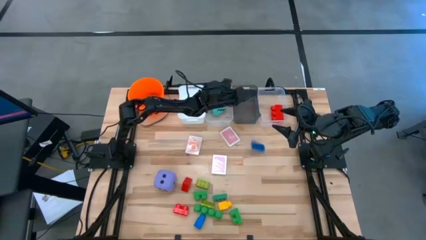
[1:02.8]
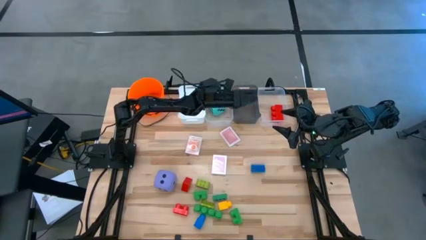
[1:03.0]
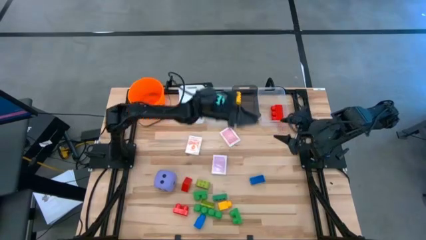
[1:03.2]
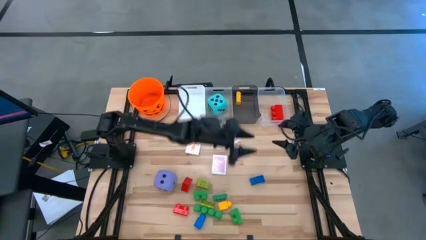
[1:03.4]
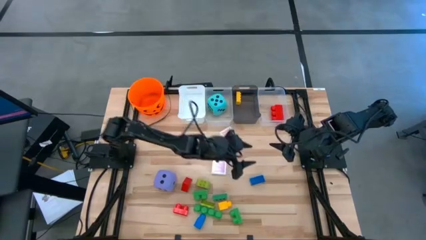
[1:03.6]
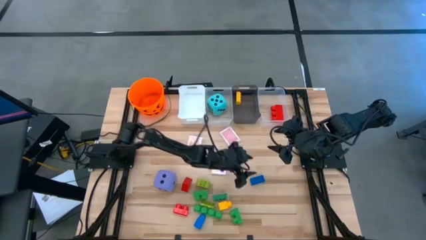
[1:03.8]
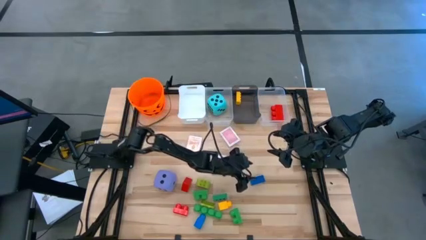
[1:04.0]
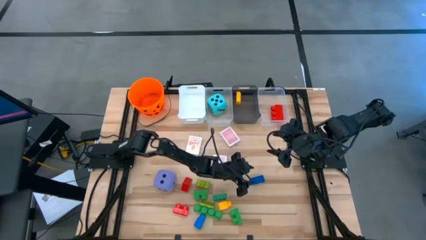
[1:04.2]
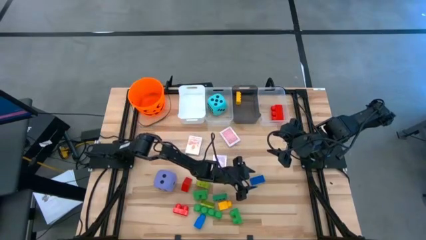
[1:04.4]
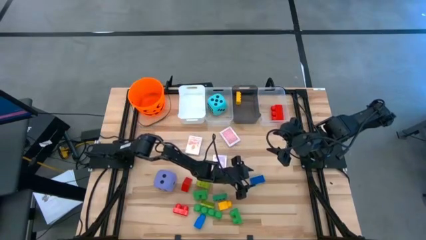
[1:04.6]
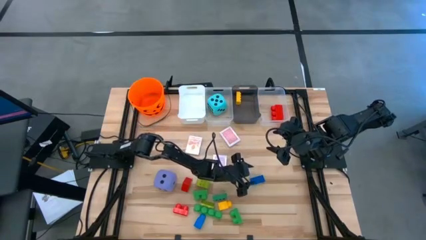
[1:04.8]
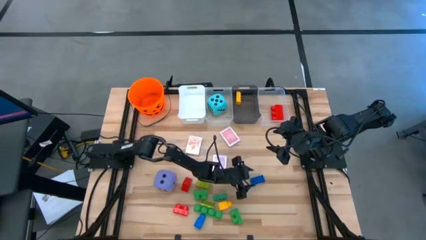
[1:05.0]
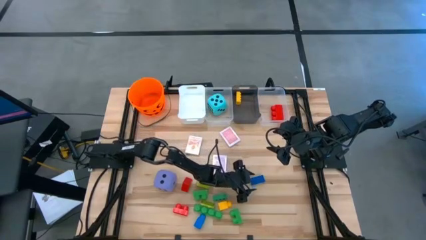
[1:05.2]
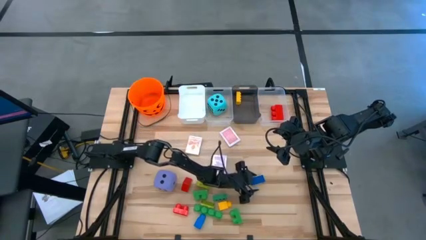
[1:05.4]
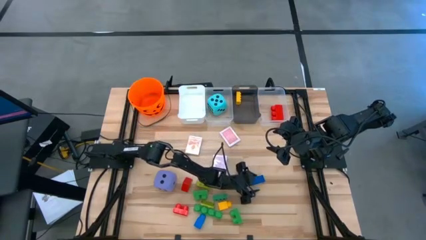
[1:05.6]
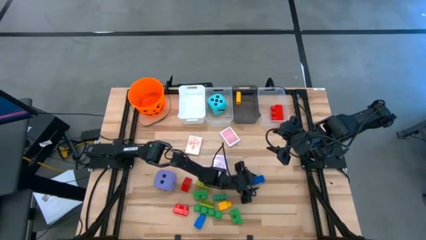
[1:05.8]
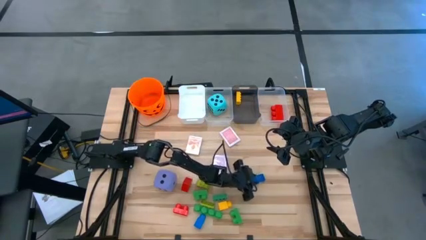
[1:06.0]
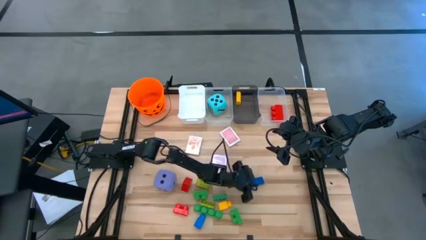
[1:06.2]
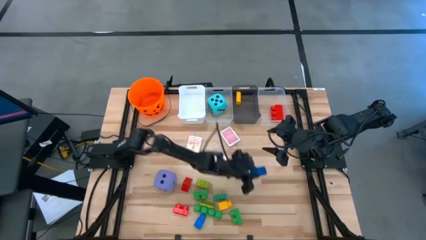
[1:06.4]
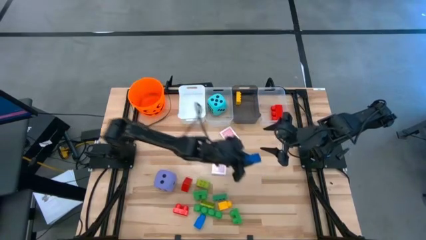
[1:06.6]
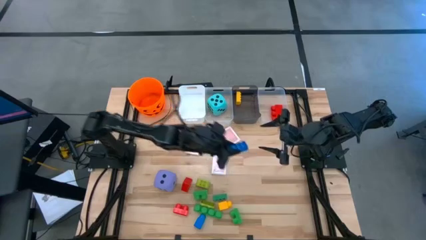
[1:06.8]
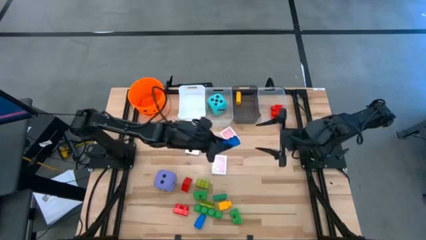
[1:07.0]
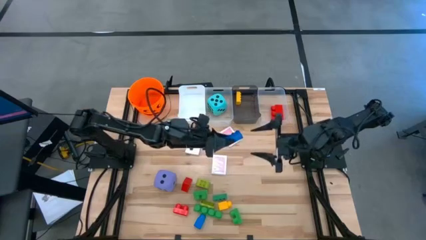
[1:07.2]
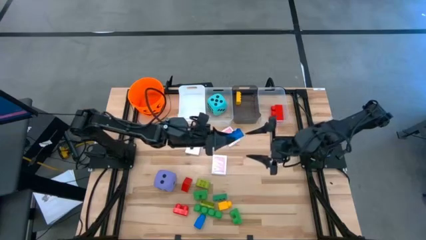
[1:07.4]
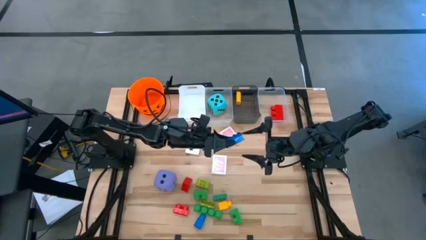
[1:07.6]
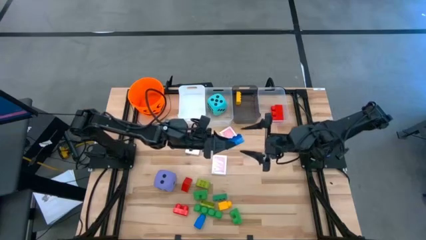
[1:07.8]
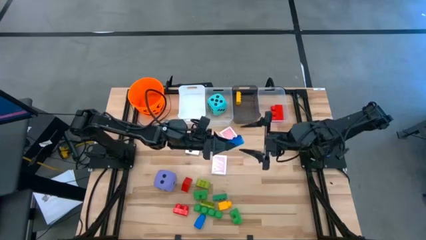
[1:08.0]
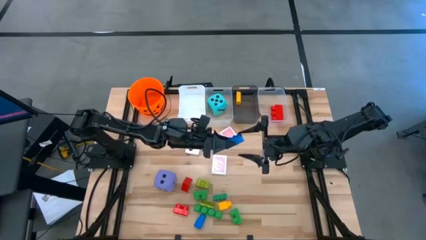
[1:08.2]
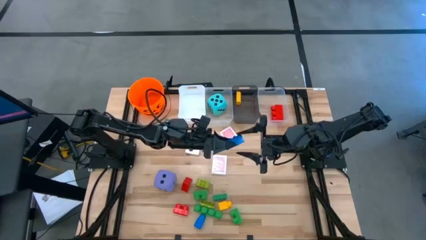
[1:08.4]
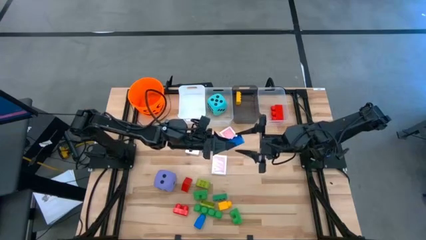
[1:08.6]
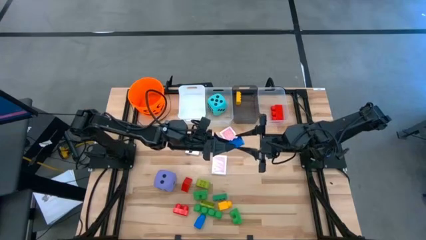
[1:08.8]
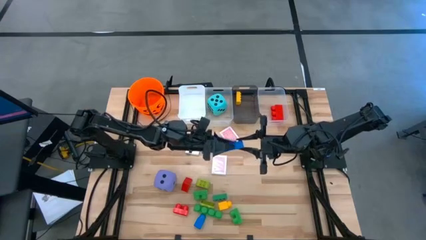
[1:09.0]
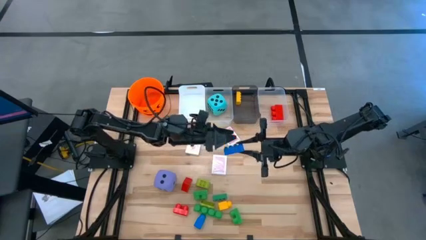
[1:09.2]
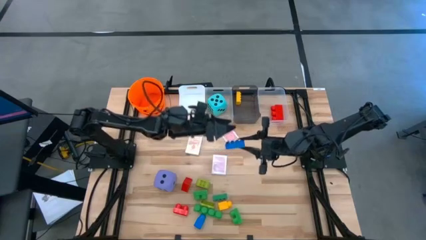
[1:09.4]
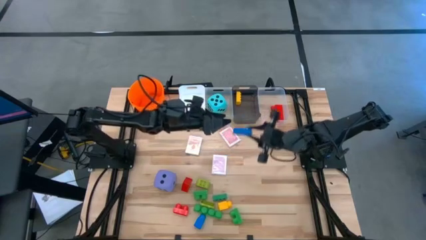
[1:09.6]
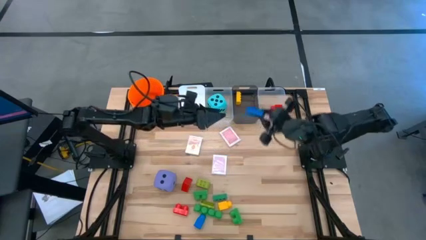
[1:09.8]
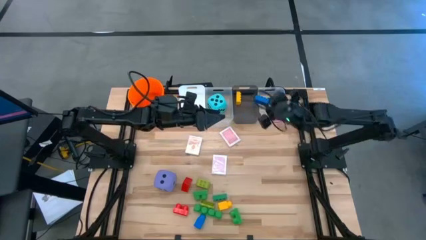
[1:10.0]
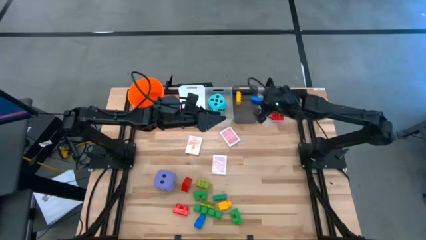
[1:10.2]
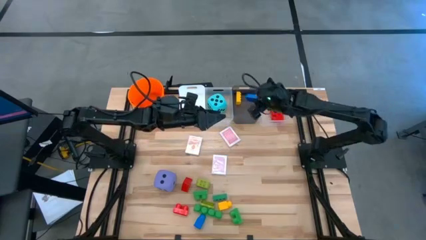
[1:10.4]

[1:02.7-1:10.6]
Task: Pick & Place Toys
Put the small blue game piece into the black bin

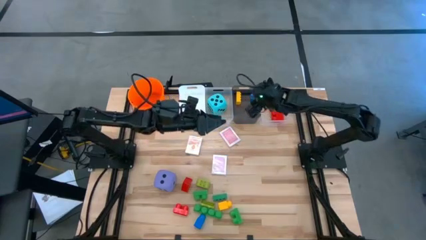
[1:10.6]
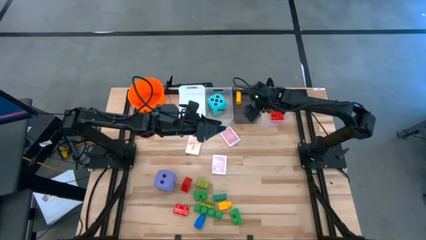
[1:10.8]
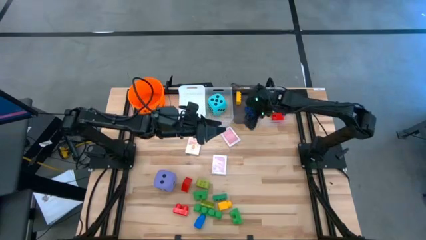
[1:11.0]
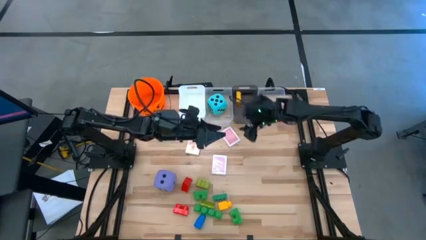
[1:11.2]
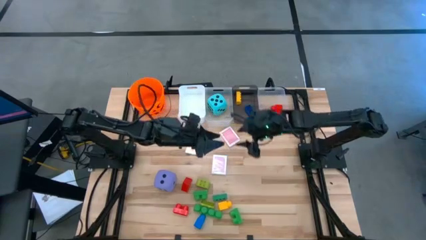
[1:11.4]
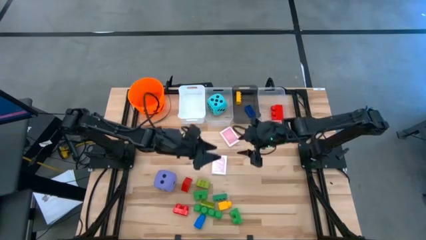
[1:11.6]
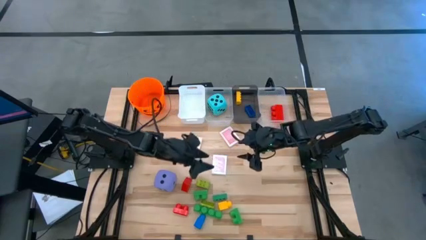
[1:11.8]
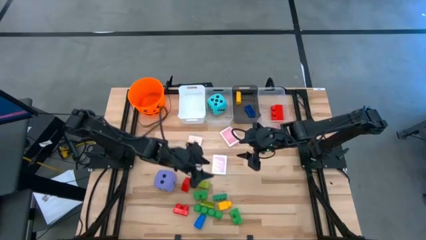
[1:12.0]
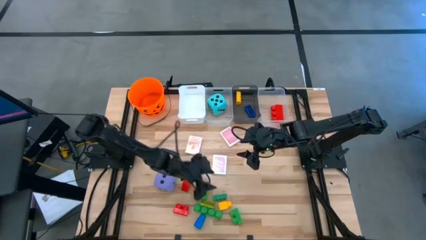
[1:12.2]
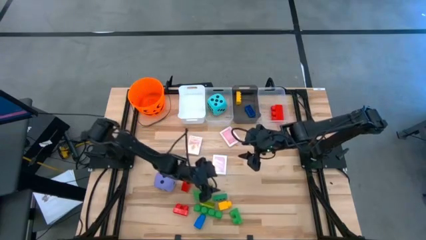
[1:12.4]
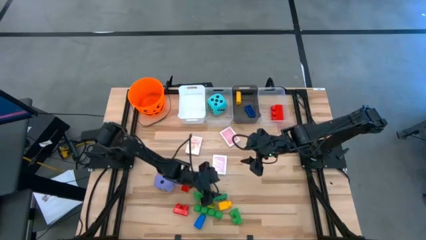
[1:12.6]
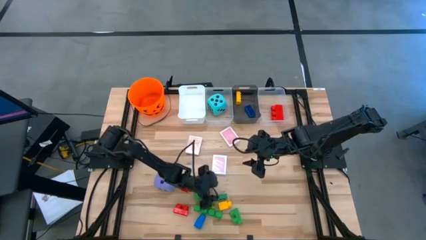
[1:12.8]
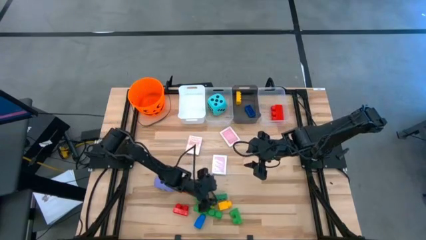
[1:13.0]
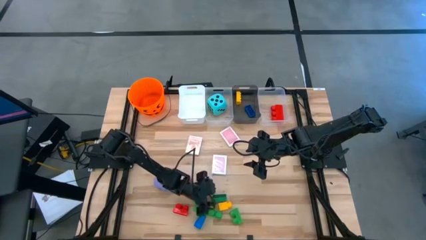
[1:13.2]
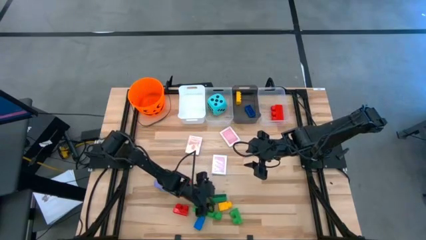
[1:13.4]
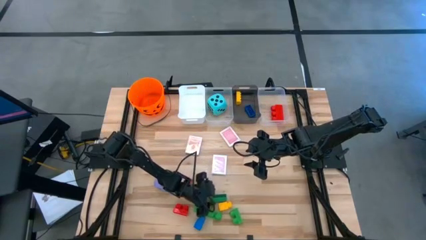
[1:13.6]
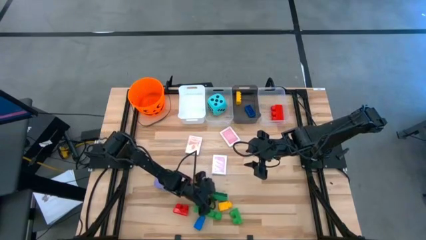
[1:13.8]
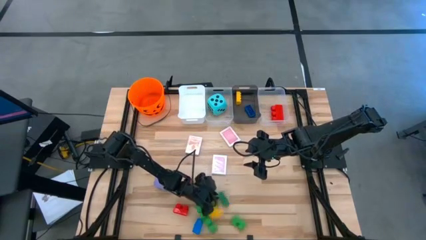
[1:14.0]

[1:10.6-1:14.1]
Put the small green game piece into the black bin

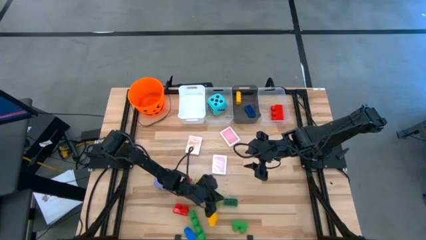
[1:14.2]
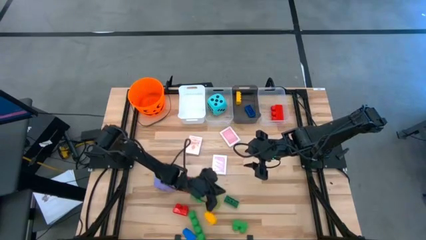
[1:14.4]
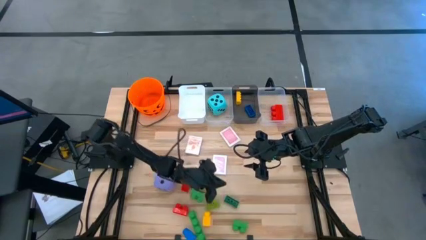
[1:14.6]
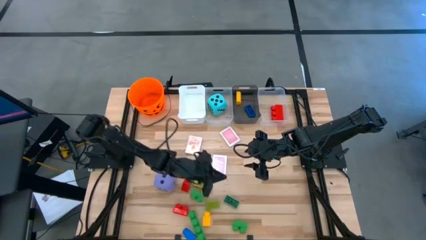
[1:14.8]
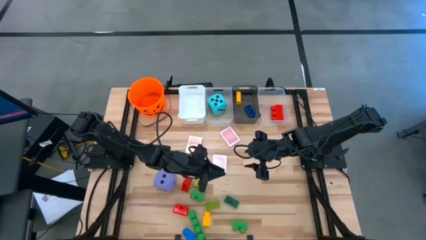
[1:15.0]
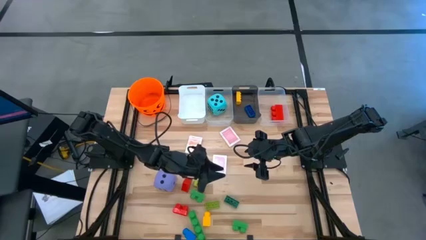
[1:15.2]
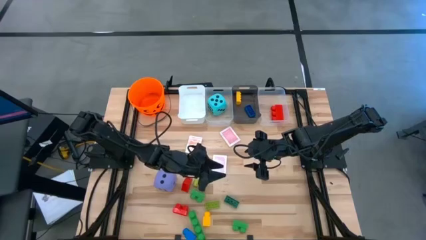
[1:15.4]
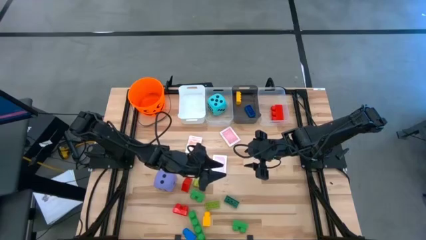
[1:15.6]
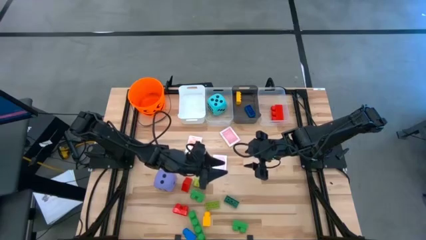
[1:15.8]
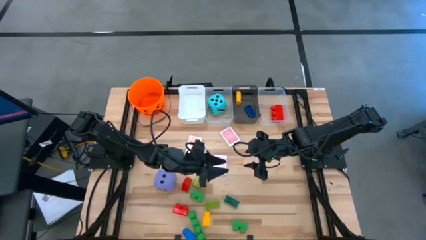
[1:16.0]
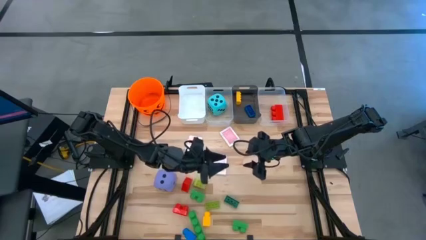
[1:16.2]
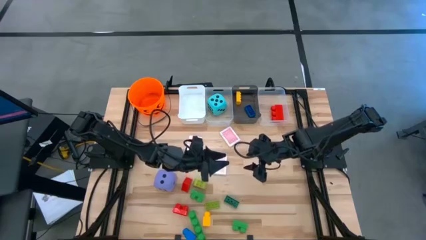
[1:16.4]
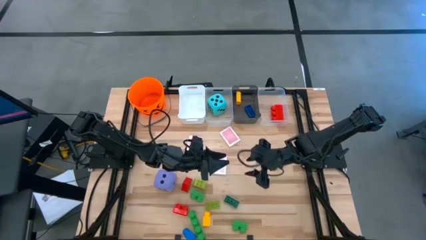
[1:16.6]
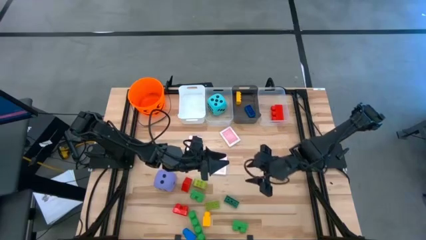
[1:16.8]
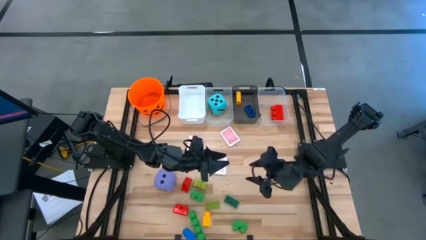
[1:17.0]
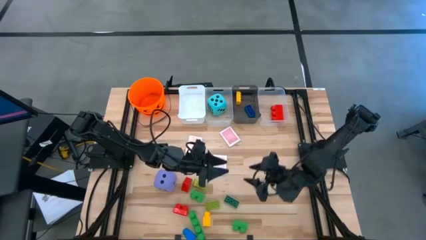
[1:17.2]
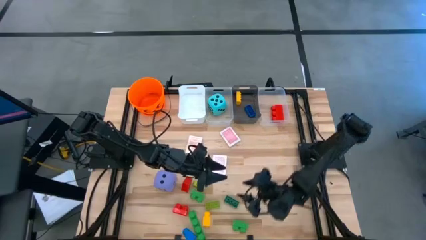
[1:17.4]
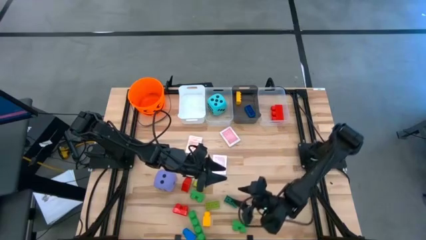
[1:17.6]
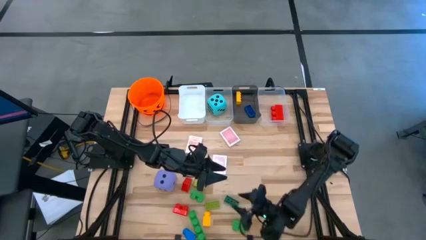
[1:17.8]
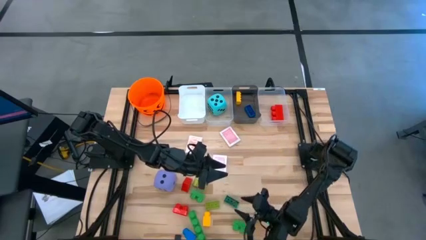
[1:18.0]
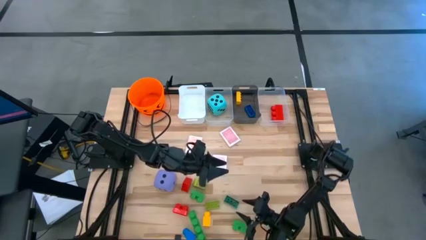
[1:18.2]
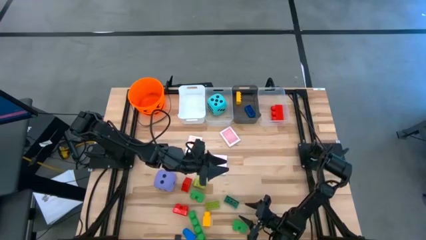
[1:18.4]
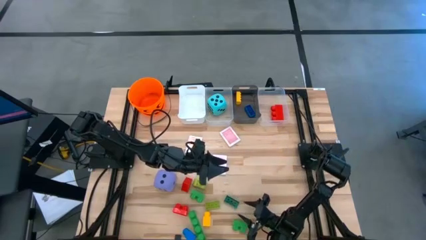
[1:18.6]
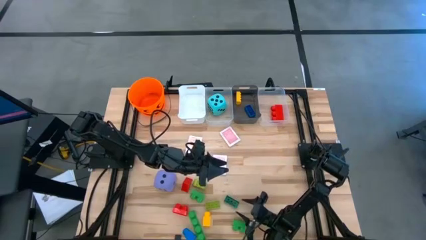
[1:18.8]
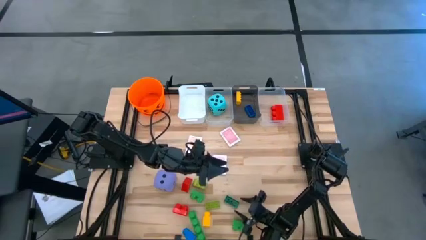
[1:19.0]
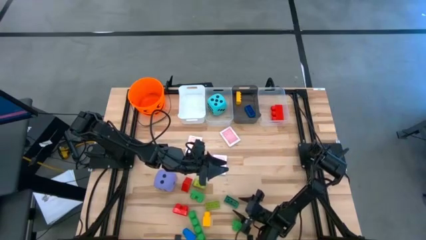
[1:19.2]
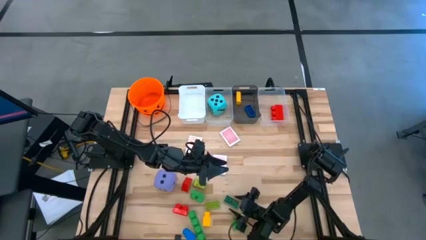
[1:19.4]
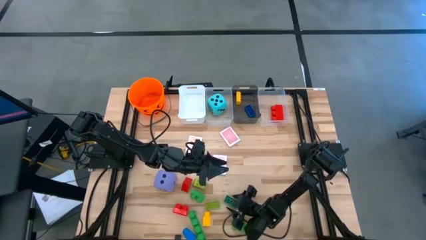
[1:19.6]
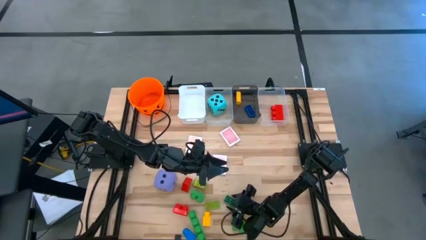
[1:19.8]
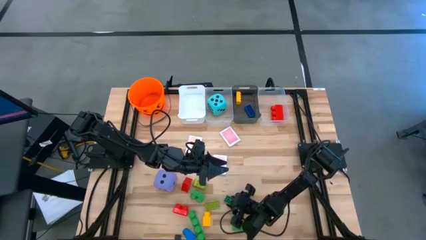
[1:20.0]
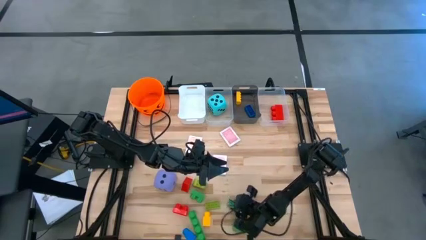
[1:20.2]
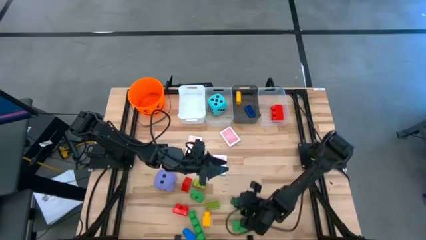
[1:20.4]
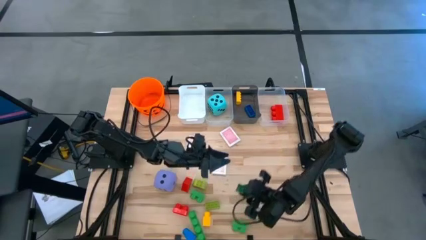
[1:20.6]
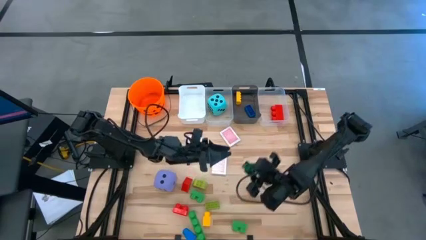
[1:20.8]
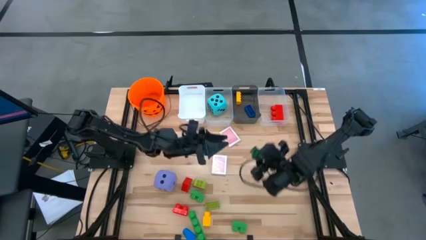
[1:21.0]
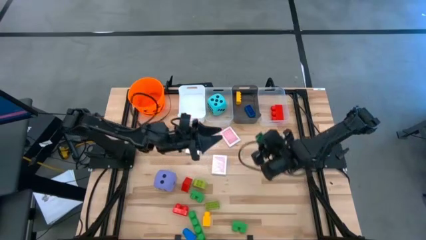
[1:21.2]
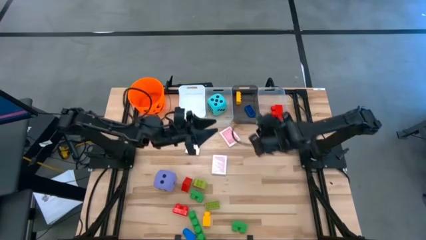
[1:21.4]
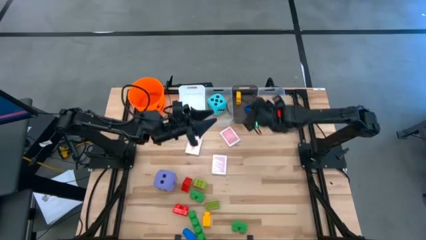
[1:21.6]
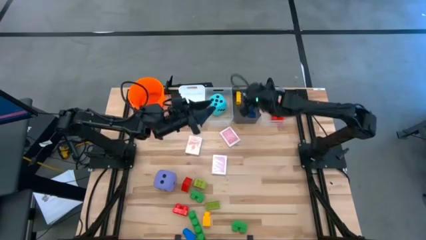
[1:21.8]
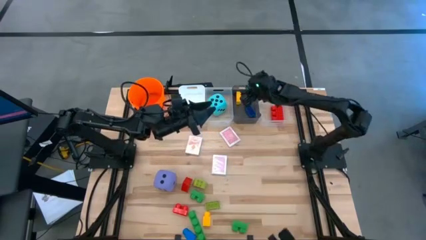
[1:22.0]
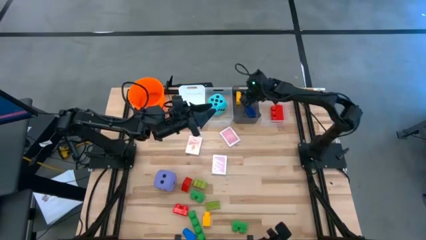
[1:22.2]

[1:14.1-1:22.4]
Put the small green game piece into the black bin
